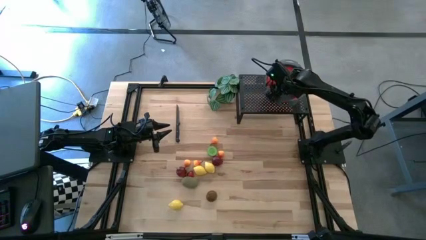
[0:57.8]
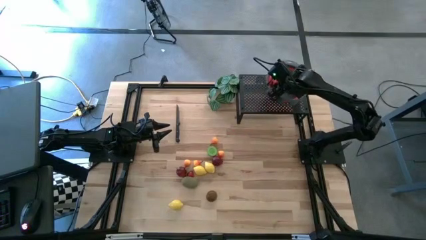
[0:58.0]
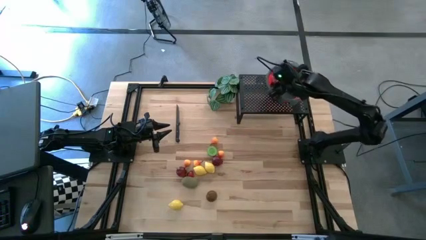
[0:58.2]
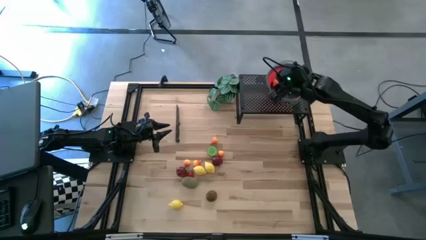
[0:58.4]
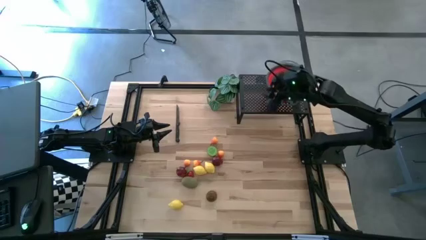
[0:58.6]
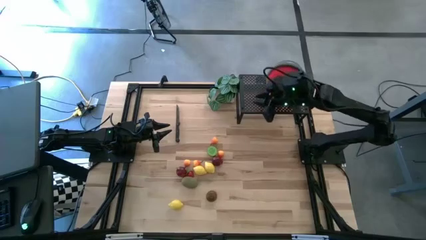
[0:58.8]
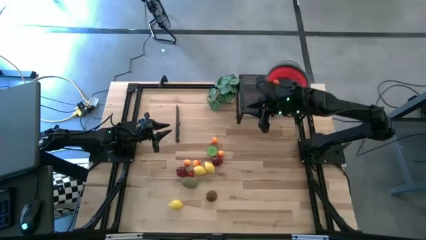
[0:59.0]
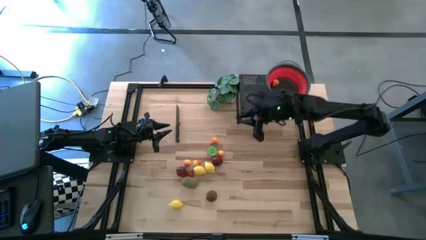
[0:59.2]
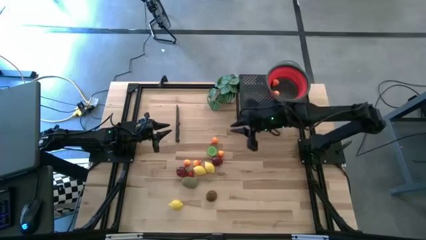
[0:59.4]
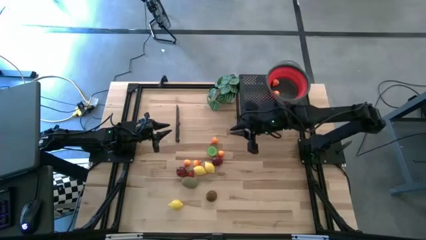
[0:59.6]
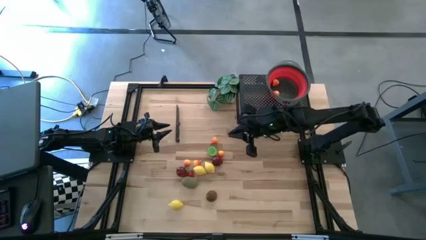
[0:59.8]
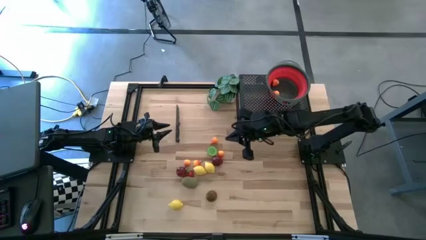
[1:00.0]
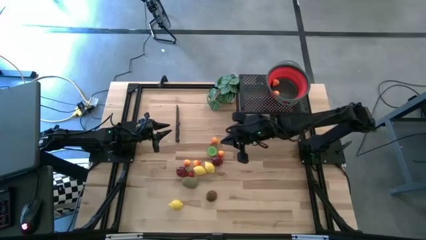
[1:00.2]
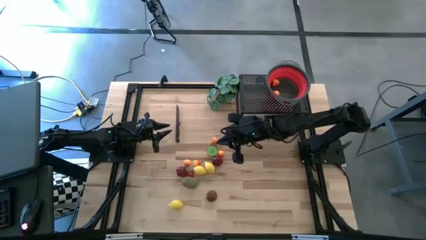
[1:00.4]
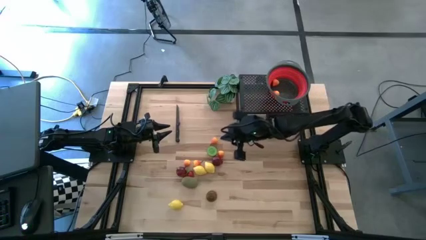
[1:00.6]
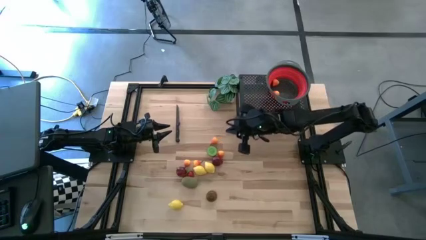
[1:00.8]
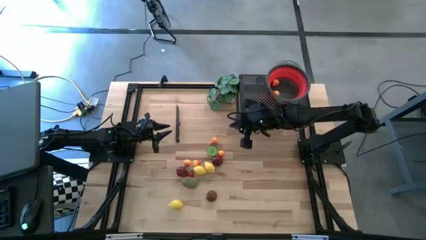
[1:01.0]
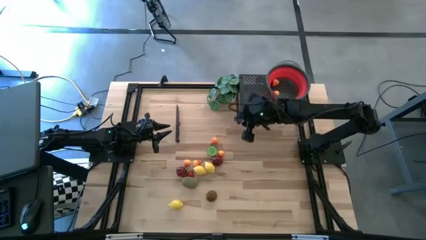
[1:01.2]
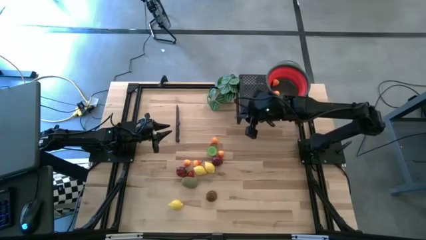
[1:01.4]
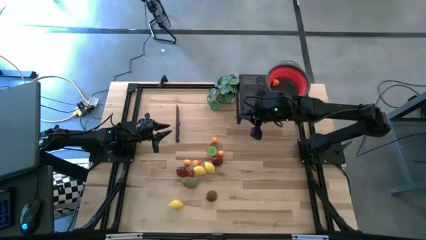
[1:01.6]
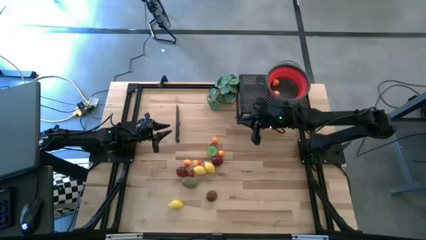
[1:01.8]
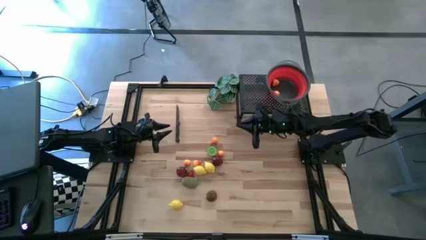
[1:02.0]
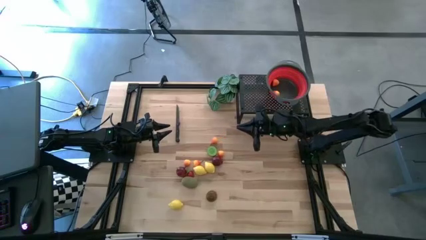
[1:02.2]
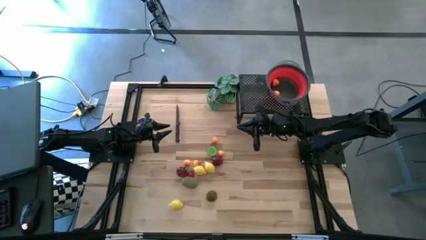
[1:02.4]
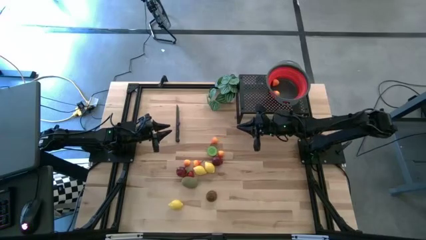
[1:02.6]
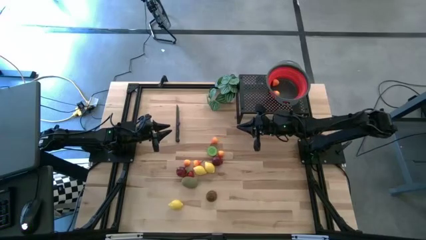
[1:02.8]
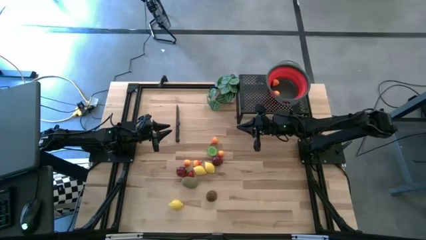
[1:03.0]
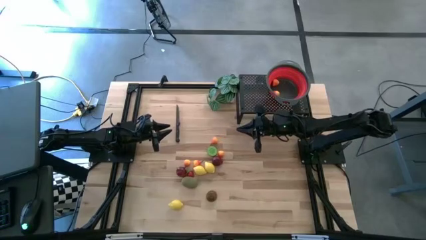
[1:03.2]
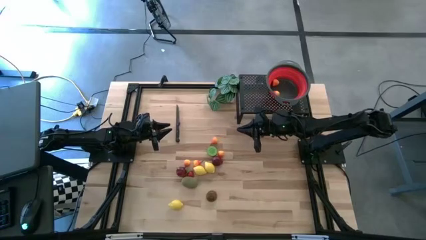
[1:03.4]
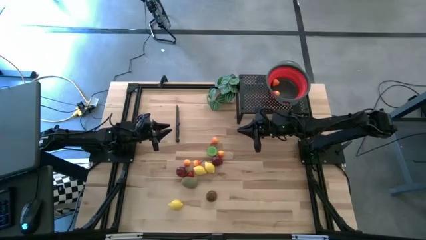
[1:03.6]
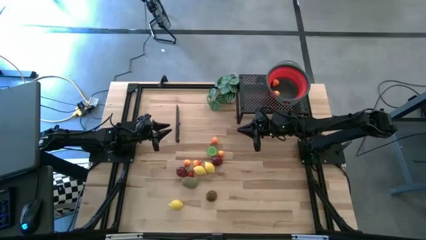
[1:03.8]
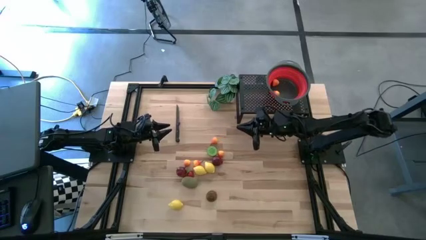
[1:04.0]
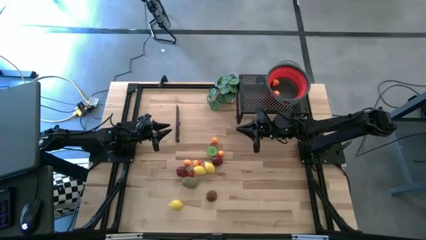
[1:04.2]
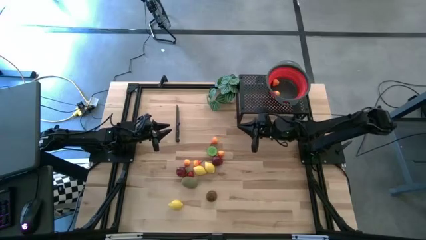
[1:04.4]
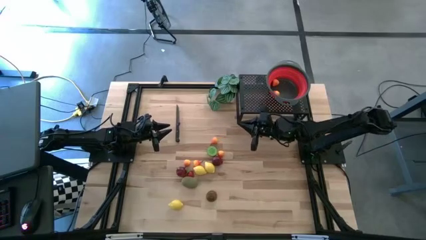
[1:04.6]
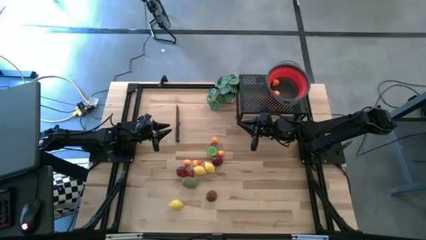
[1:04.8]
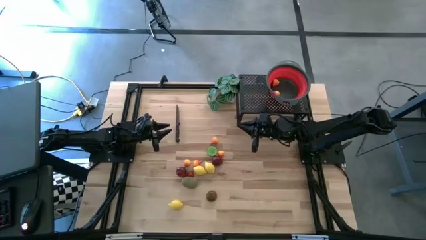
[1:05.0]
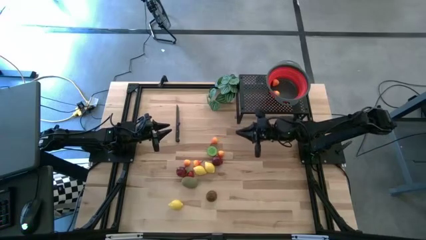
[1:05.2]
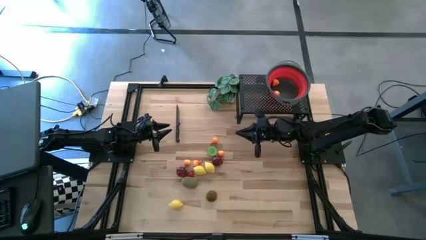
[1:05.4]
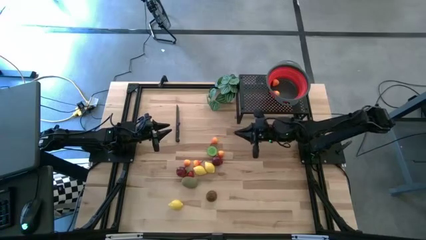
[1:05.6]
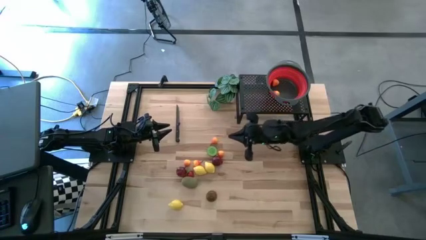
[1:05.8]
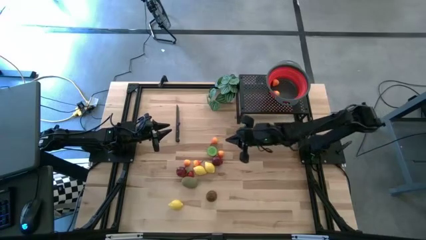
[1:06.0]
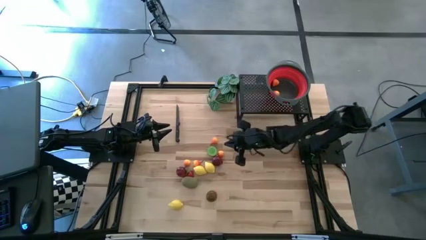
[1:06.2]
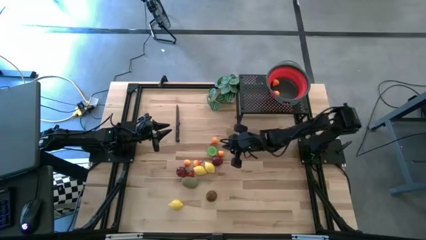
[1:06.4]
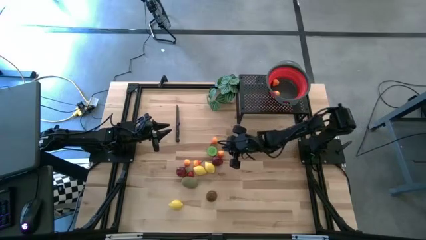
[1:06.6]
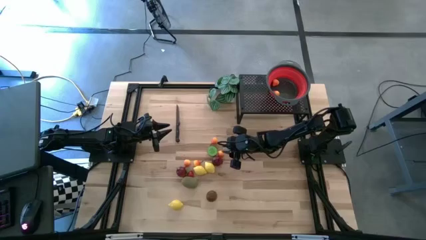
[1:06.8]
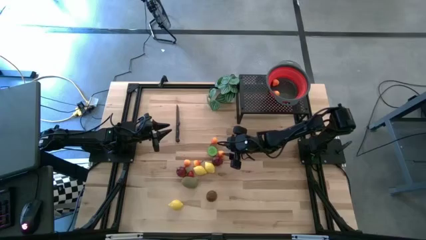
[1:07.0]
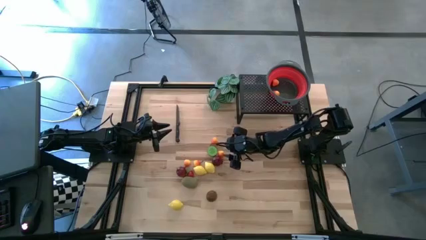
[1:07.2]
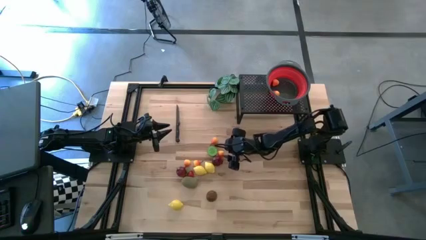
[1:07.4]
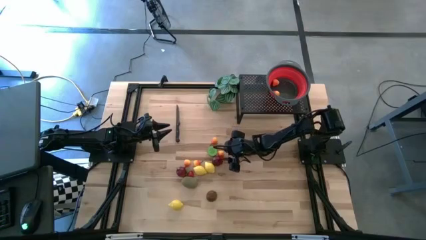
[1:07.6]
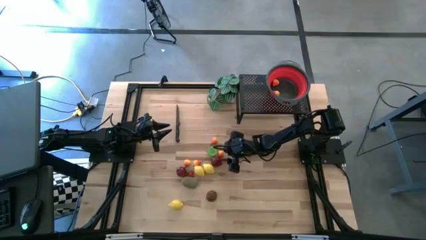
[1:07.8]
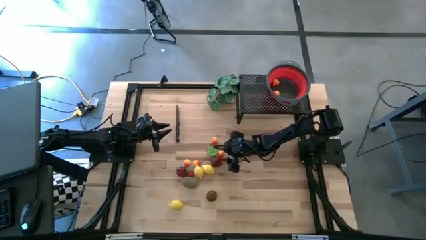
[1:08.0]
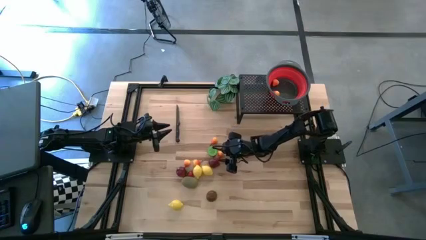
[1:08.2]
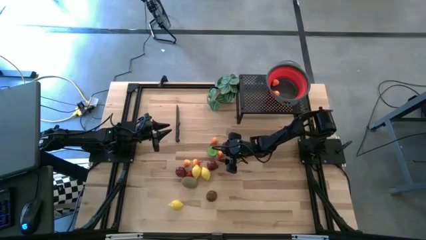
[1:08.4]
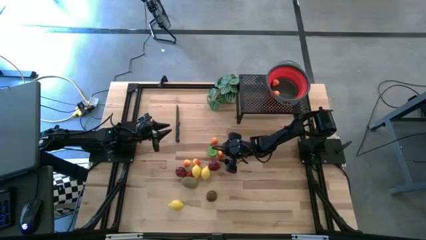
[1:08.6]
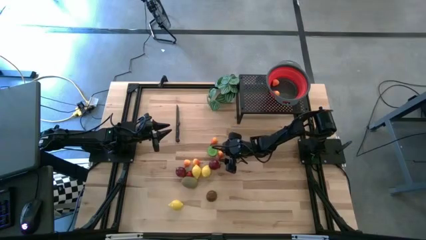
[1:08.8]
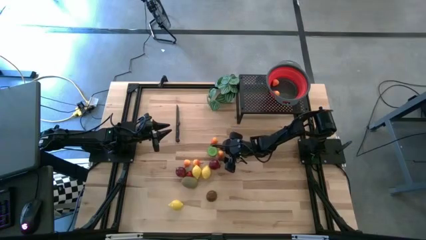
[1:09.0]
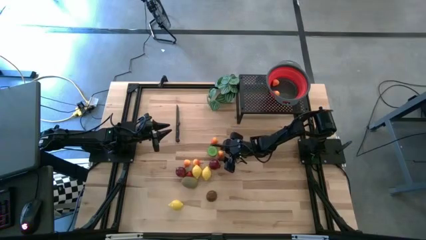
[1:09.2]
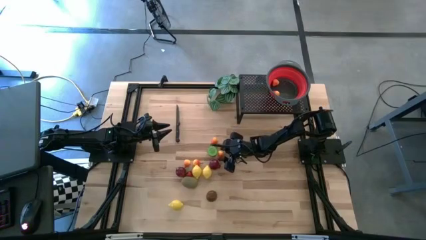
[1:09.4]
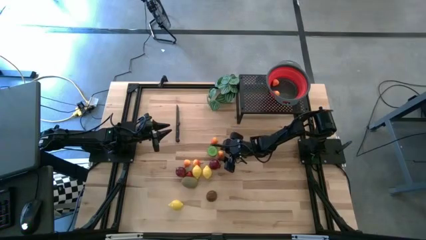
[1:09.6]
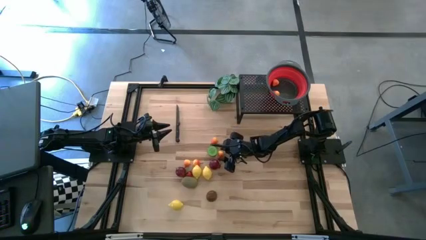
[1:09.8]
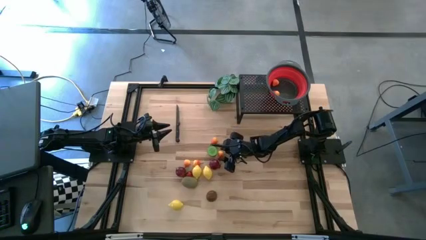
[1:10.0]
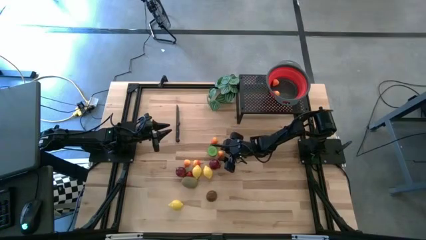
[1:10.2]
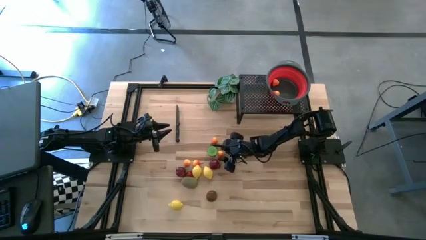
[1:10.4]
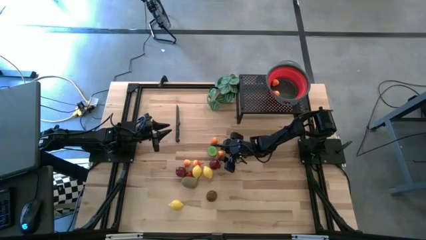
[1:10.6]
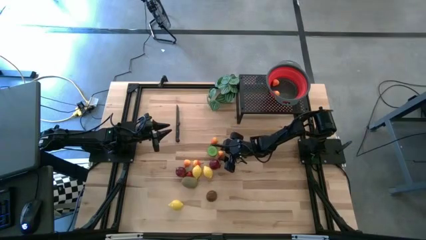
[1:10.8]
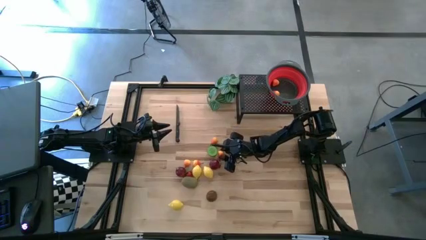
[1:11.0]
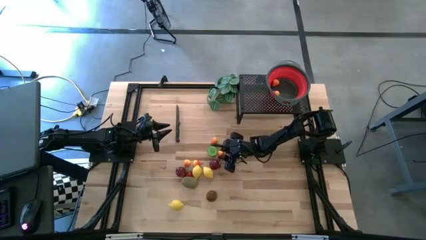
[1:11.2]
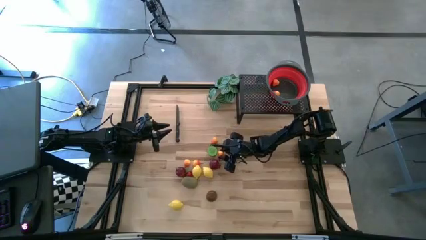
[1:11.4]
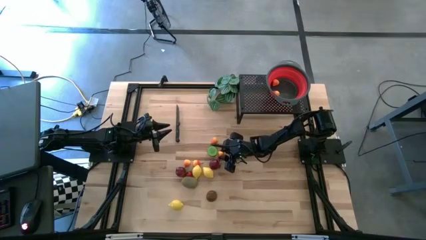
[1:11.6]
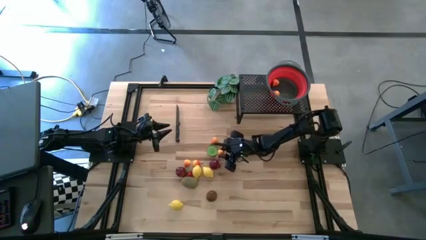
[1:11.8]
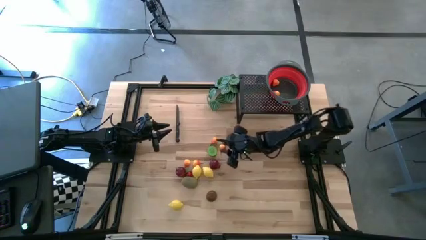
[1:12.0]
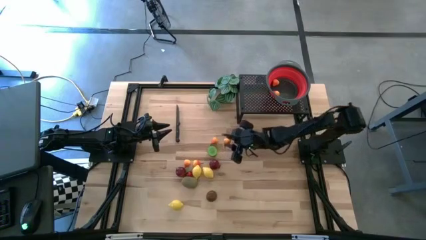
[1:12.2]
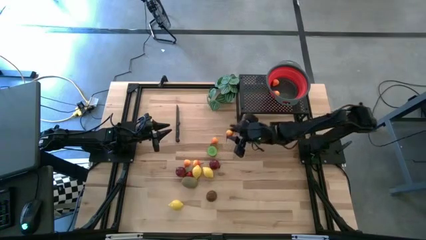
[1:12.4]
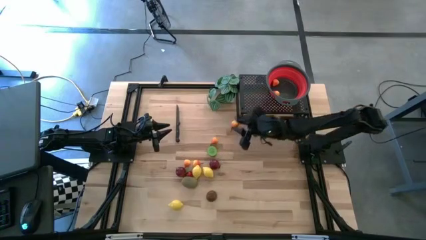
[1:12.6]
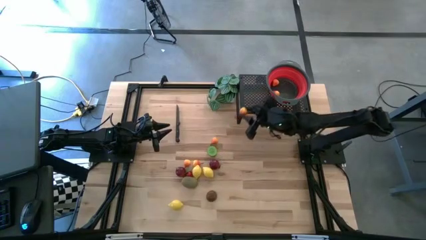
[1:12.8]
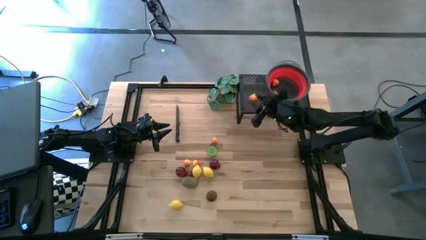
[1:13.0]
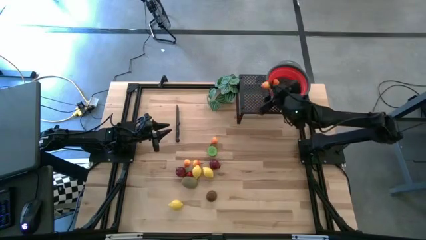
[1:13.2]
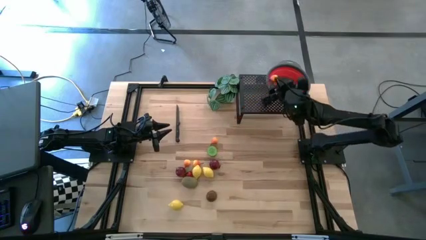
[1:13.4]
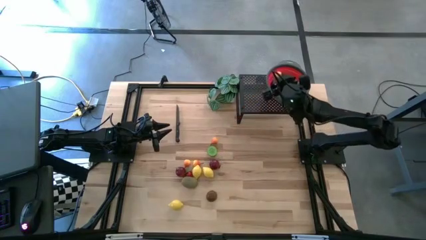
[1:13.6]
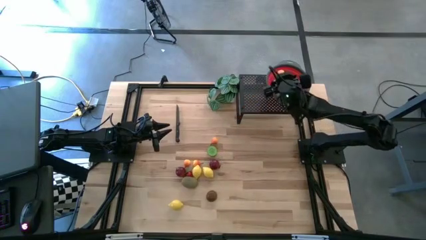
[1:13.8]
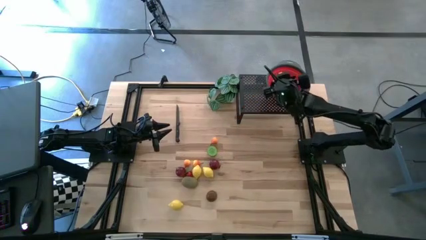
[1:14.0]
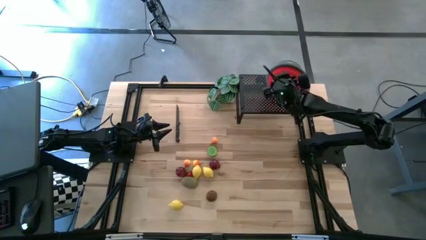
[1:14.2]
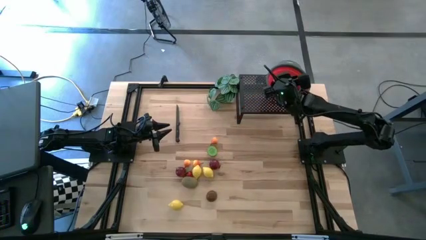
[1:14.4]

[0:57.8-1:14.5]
Task: Pick & Place Fruit
Put the orange pear into the red strainer bowl
